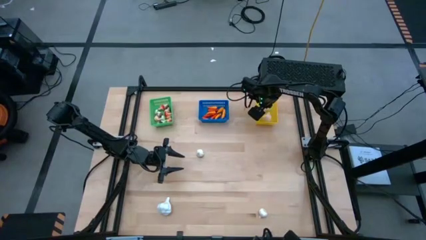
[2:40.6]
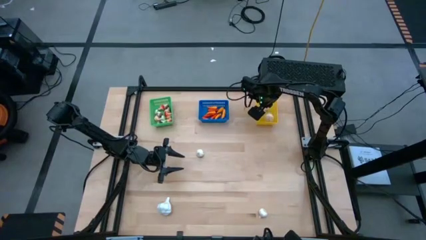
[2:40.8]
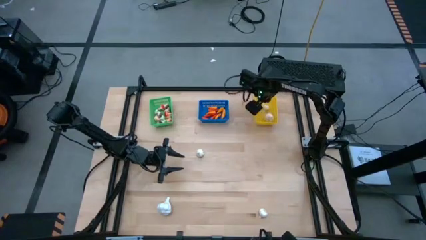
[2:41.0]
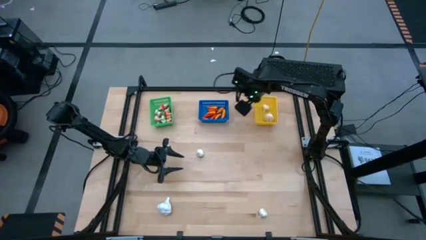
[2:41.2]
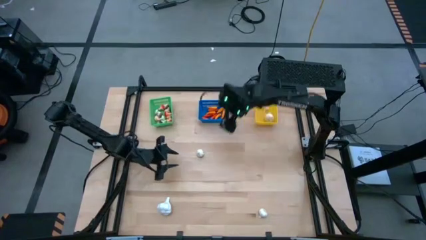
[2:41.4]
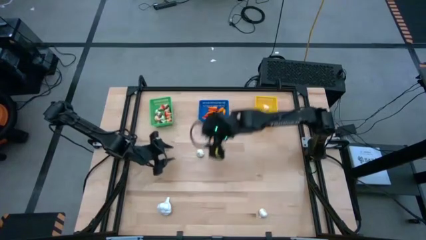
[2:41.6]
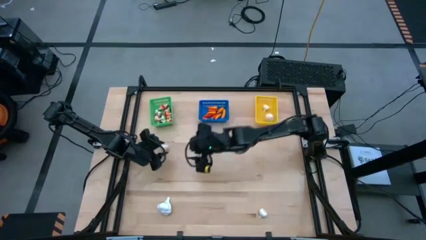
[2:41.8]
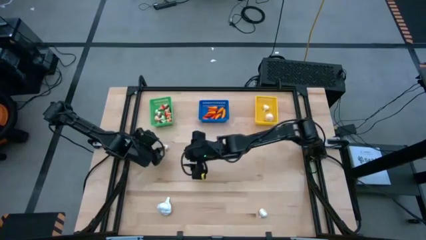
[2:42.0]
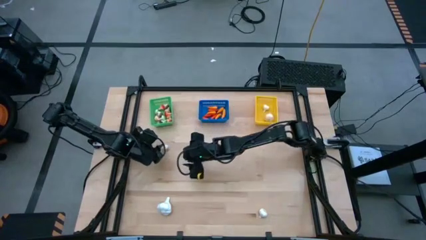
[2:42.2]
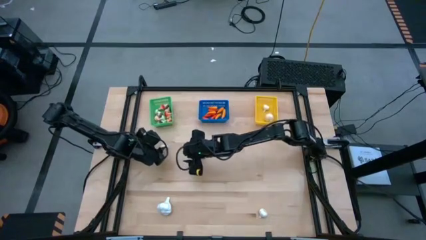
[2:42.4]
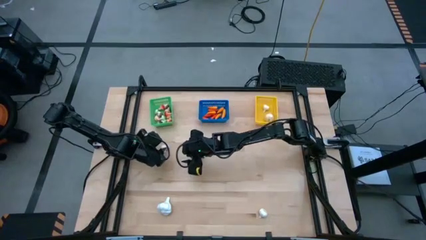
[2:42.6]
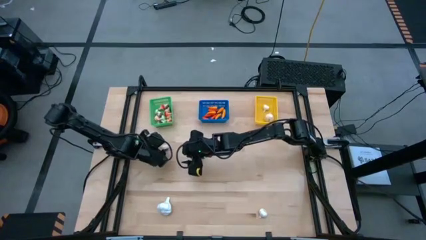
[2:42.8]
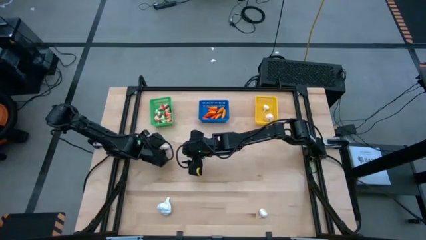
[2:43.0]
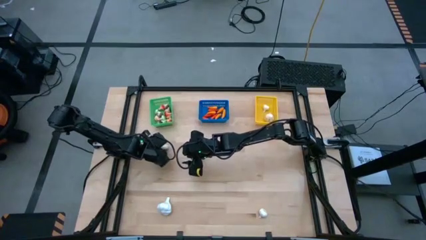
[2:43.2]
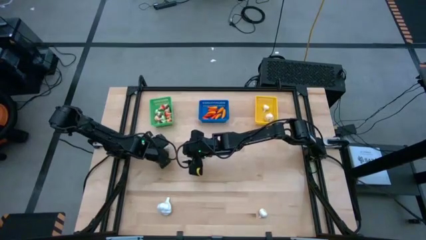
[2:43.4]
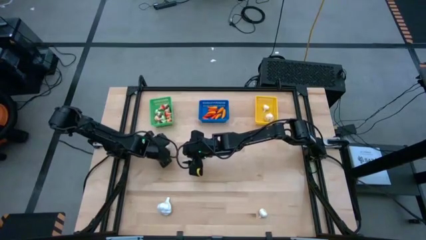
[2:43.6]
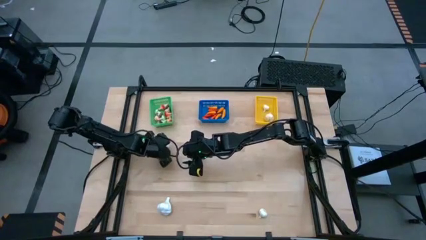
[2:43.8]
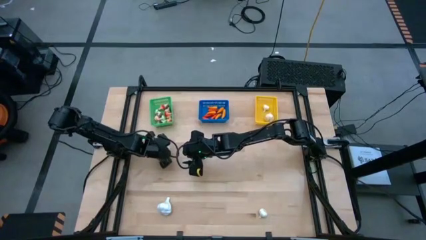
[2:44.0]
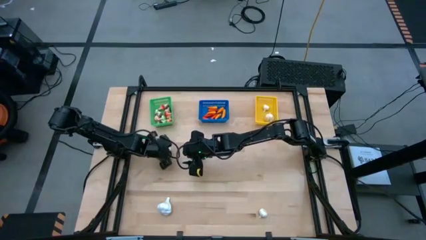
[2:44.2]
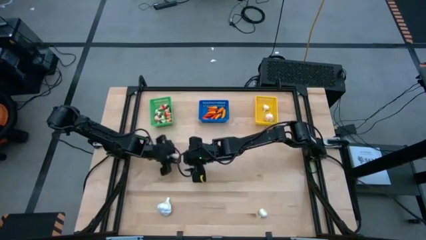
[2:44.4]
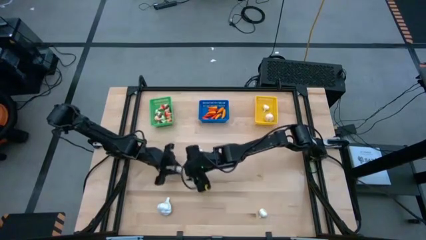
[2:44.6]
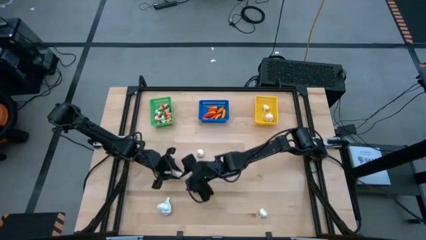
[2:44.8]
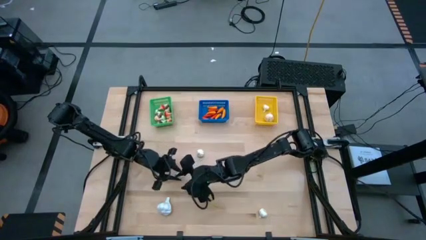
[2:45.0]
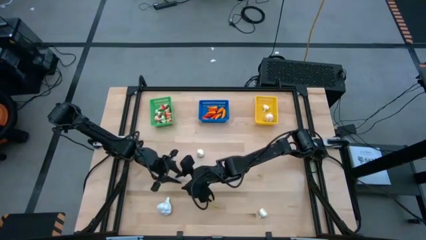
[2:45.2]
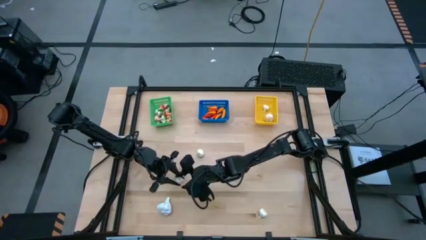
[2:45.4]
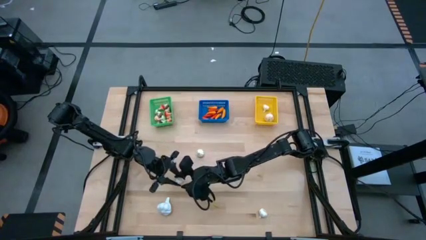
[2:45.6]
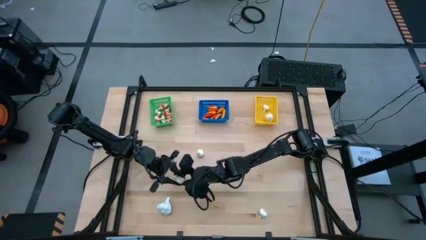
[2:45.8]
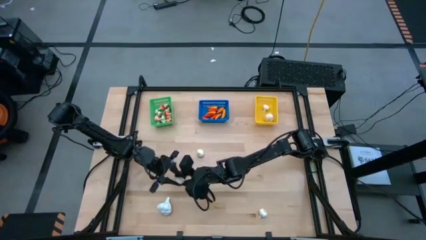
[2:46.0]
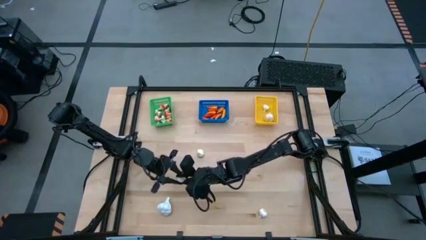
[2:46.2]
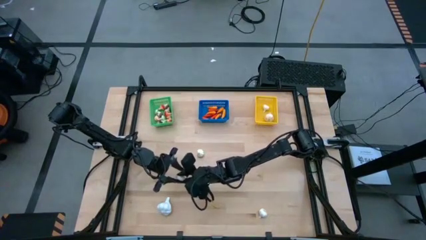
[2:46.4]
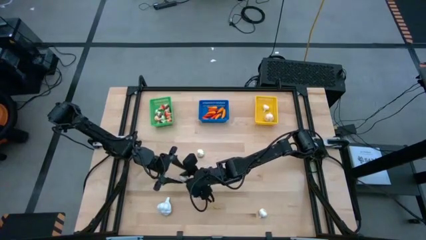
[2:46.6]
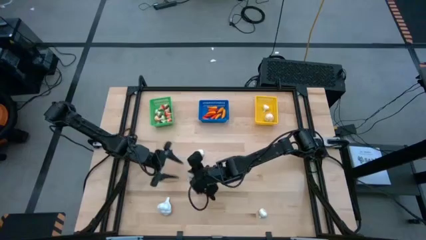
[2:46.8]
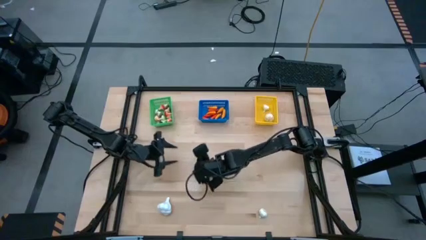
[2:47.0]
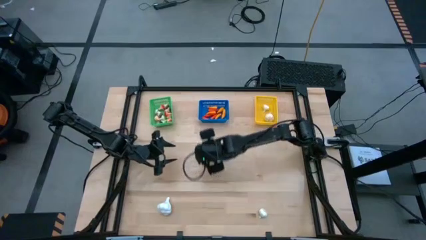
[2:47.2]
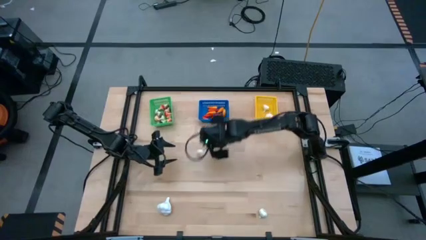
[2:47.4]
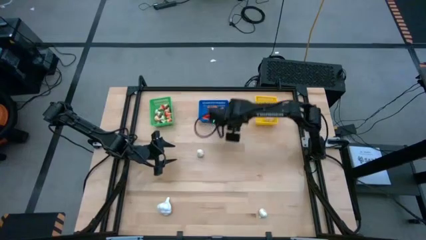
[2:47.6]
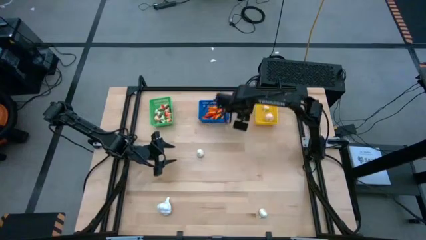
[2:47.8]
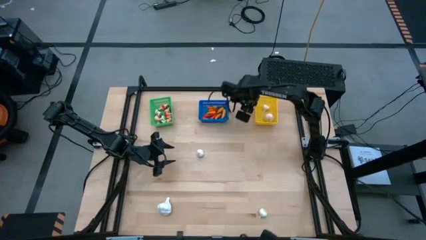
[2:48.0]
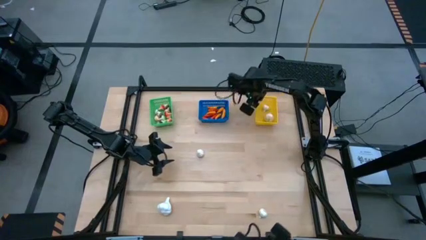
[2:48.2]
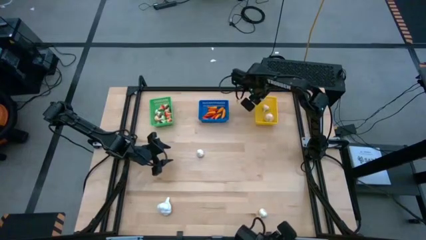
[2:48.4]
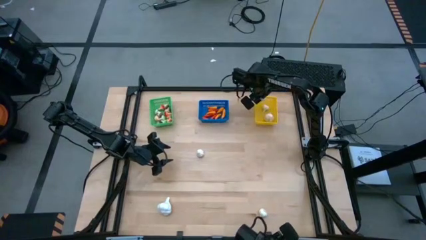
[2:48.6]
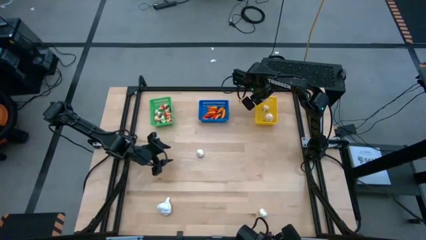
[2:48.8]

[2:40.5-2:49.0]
Task: Sort produce into baskets
Put the garlic into the yellow bin

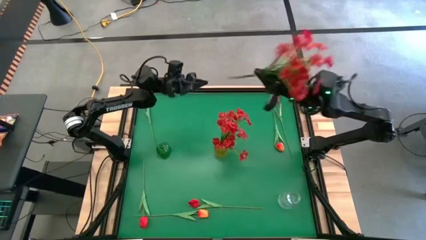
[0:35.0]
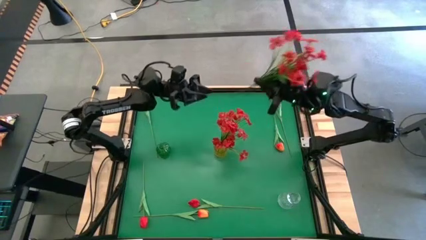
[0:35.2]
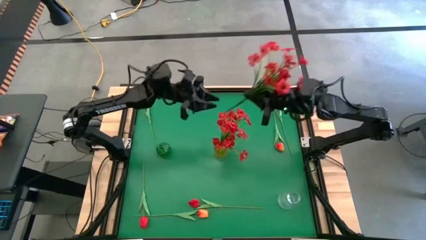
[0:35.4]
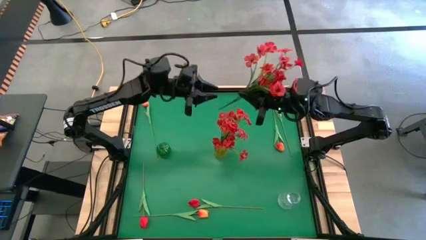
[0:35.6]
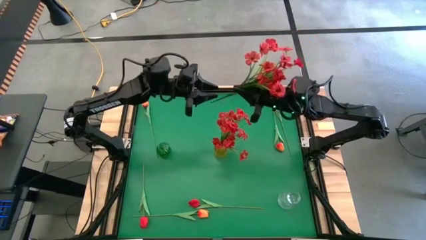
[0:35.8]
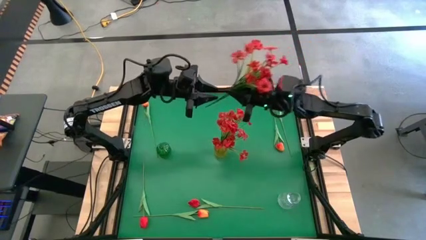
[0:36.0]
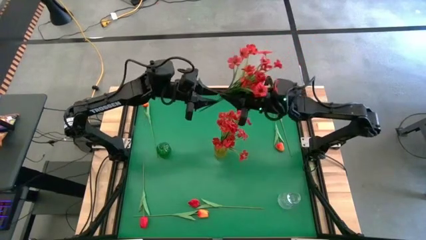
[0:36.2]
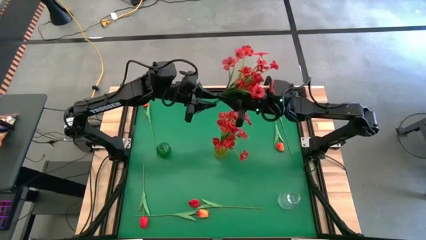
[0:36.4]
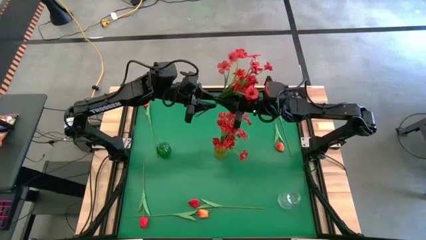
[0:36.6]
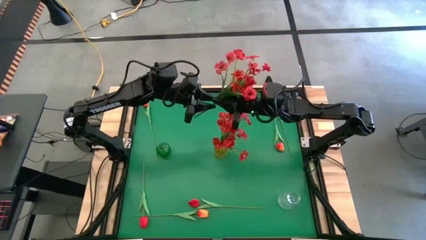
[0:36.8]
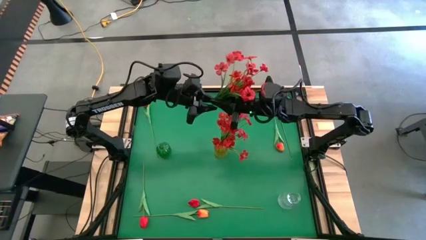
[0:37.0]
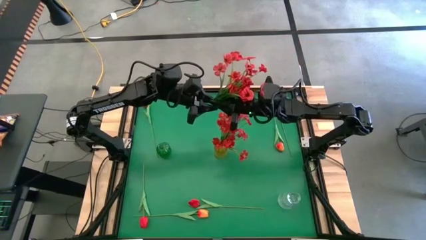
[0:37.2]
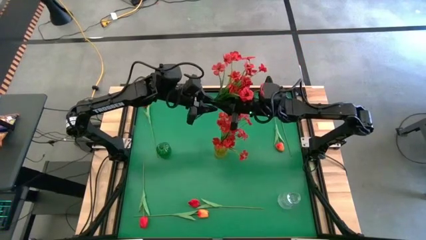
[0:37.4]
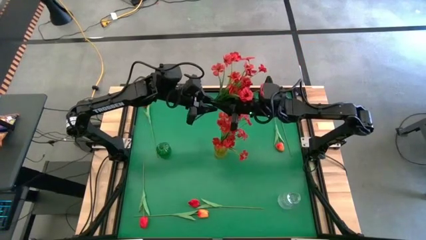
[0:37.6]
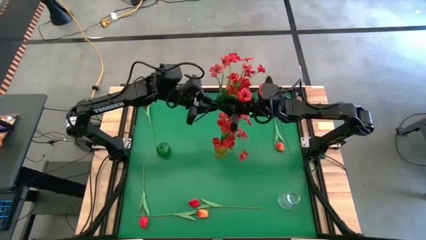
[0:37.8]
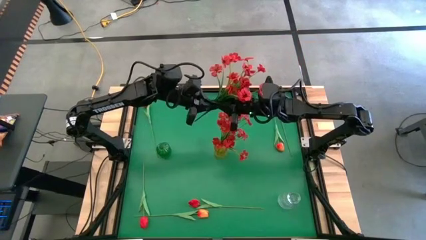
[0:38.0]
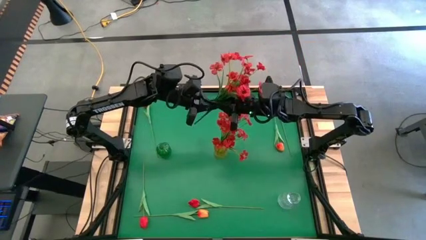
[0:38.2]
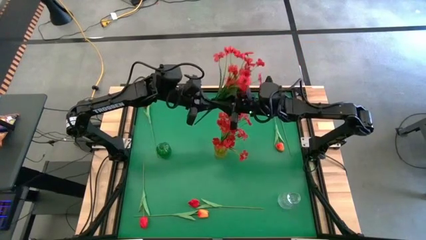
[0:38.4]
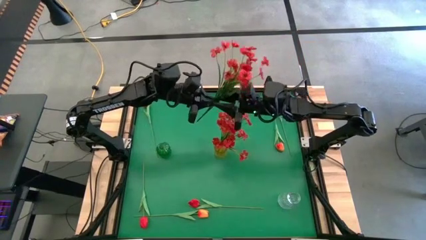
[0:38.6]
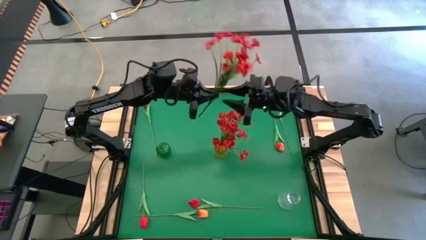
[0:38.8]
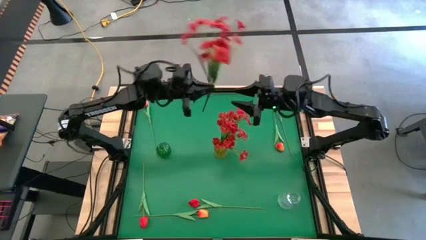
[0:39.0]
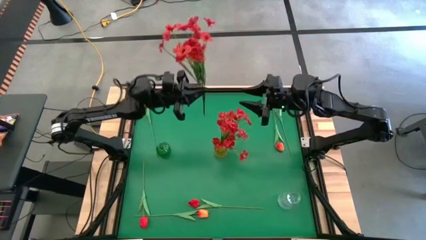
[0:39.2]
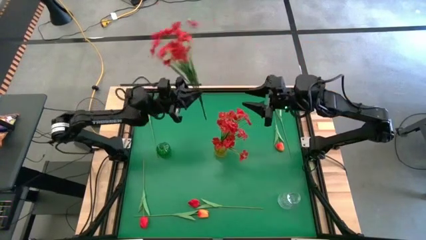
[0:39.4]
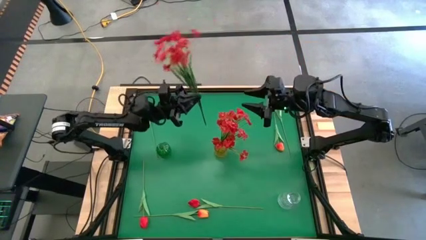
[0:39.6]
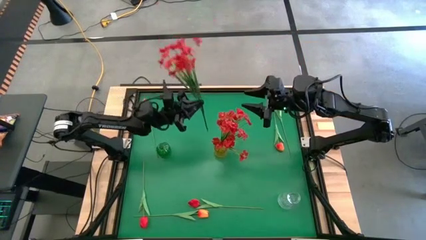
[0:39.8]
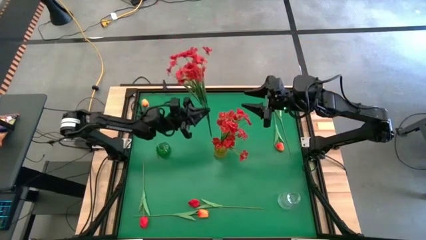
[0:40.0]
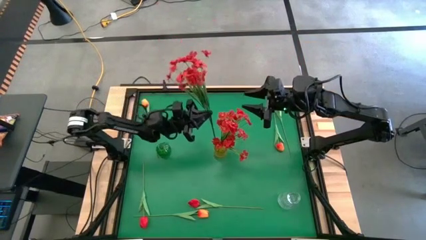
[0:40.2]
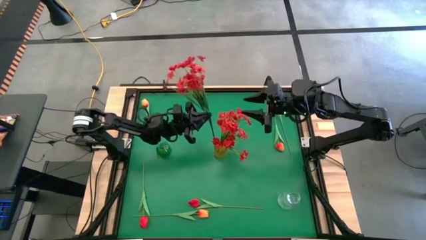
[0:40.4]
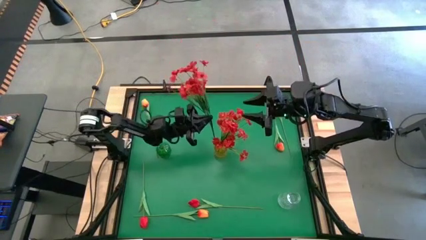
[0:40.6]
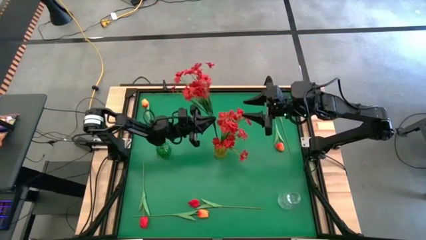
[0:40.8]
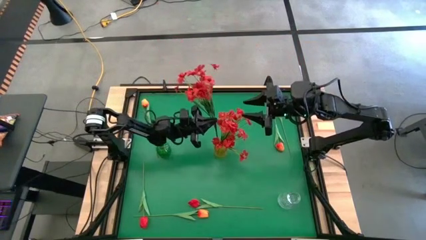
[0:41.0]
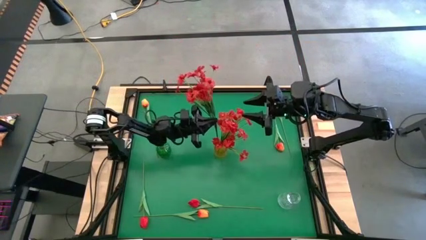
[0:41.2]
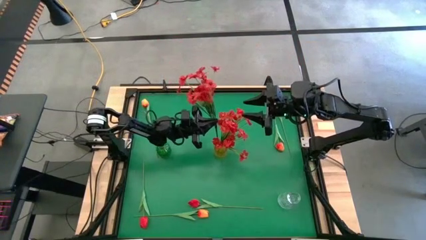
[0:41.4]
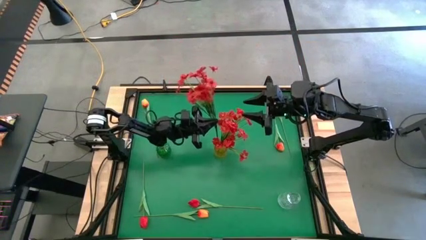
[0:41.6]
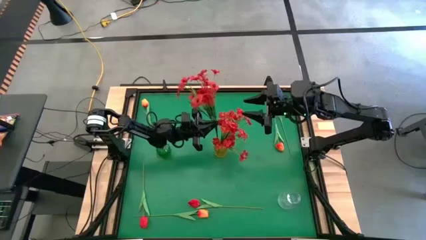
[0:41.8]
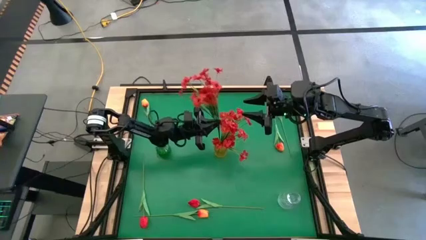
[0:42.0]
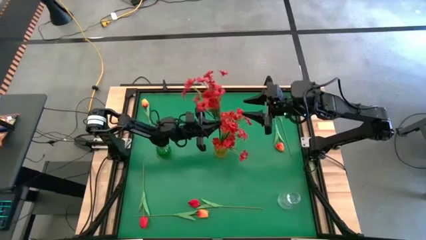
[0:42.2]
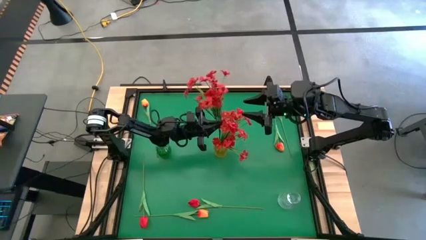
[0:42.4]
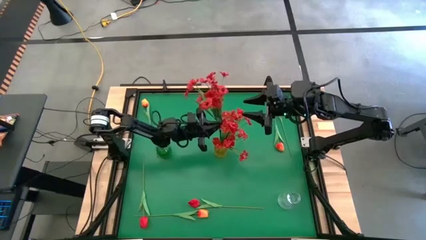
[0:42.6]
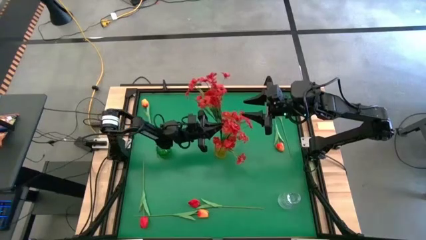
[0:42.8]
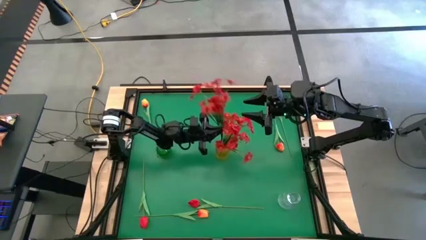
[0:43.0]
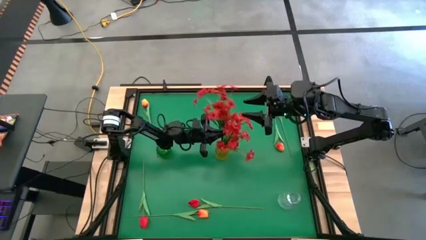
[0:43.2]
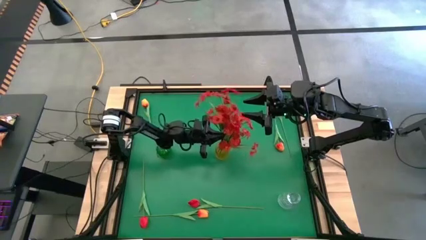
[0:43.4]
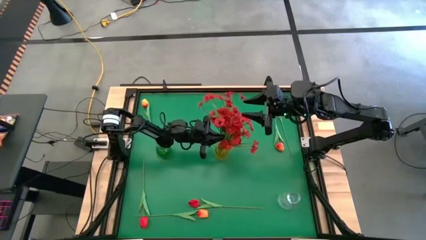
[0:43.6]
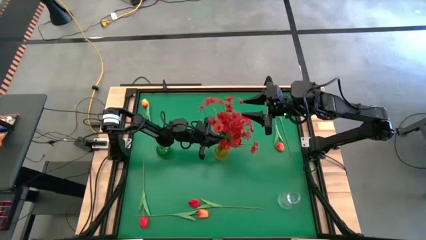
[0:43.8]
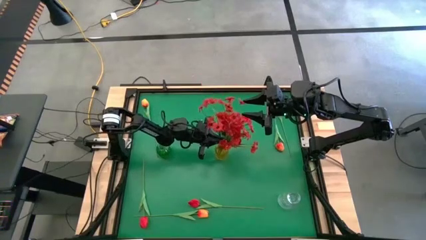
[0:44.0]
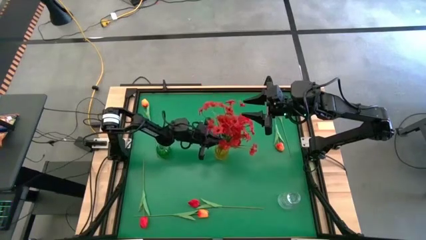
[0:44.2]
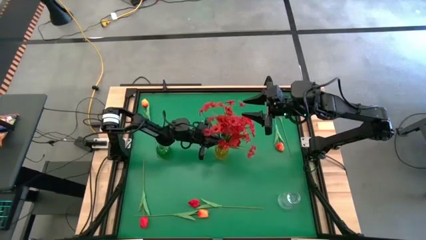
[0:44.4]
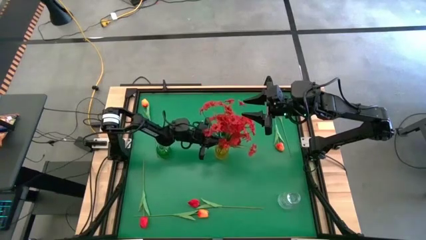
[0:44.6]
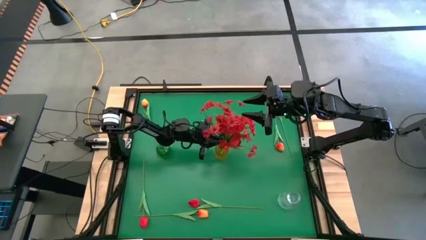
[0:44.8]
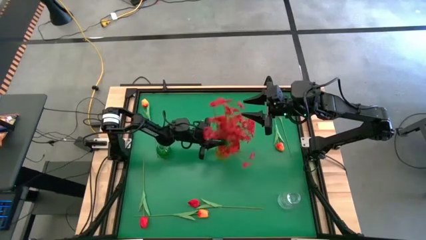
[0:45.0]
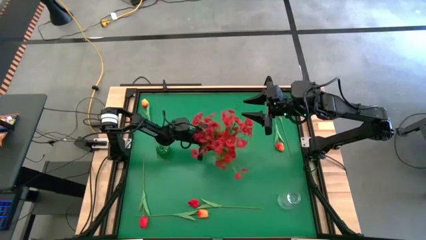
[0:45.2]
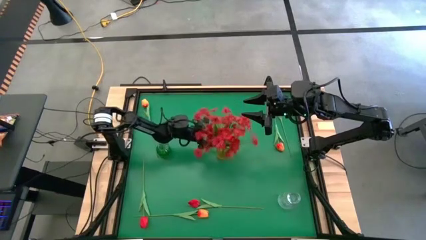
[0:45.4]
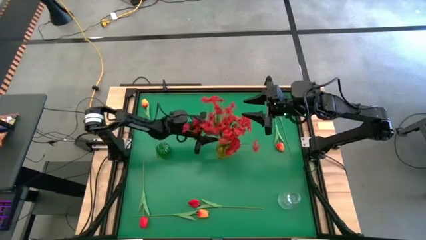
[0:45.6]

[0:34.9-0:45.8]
Task: Sort flowers into vase by color
Put the red flower into the yellow vase
